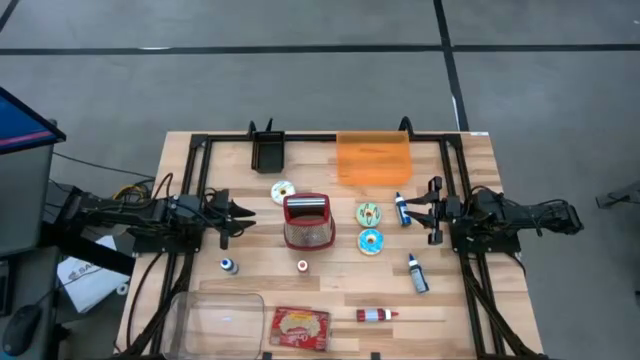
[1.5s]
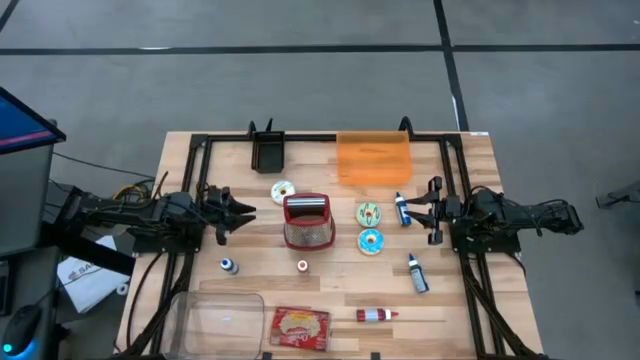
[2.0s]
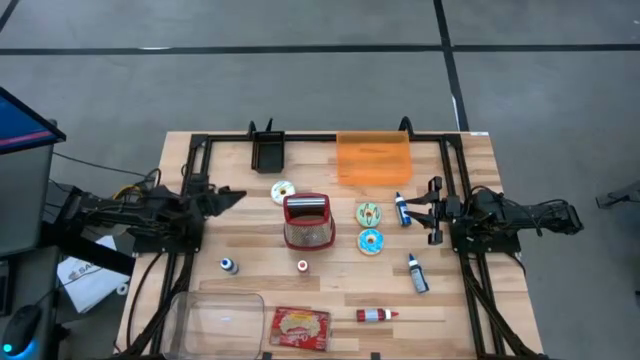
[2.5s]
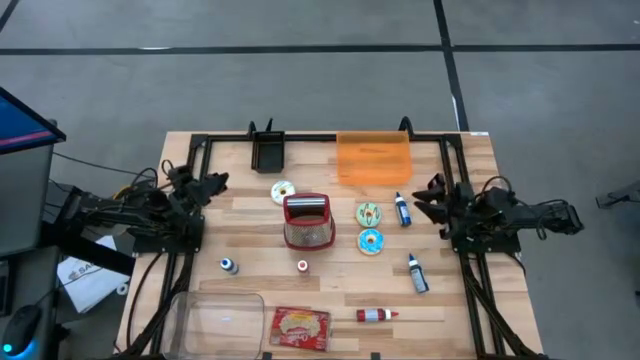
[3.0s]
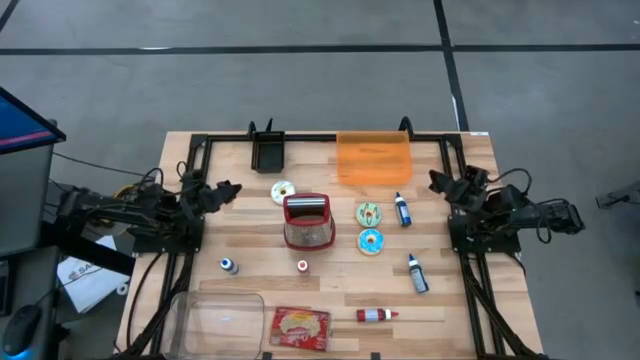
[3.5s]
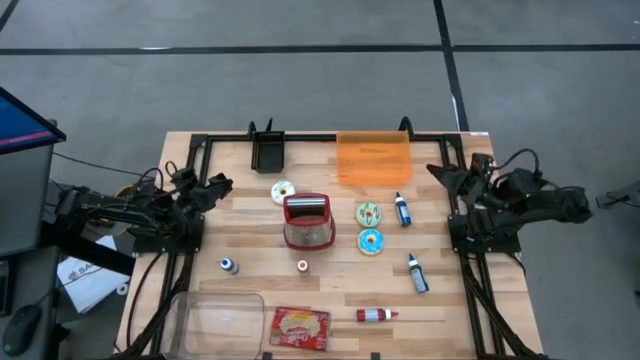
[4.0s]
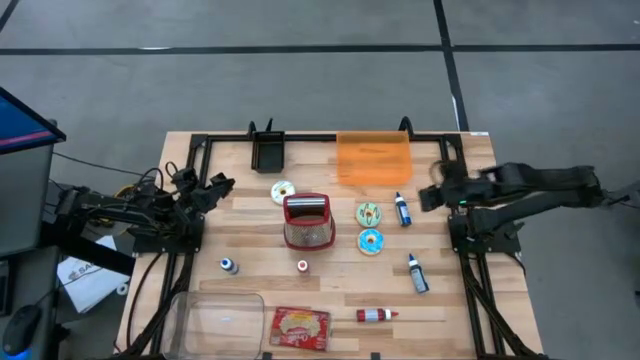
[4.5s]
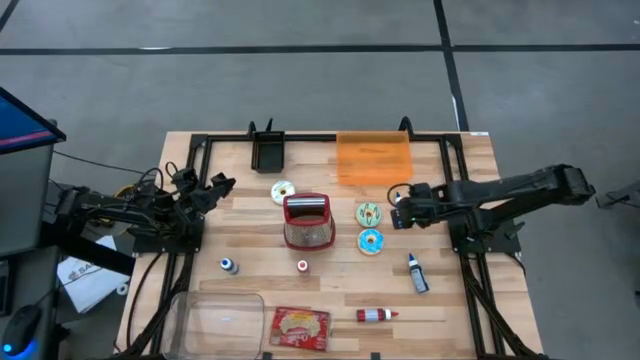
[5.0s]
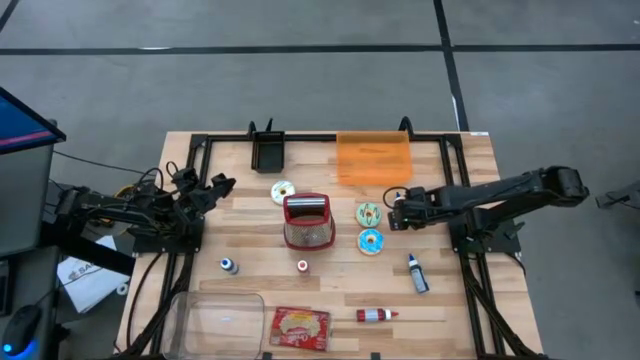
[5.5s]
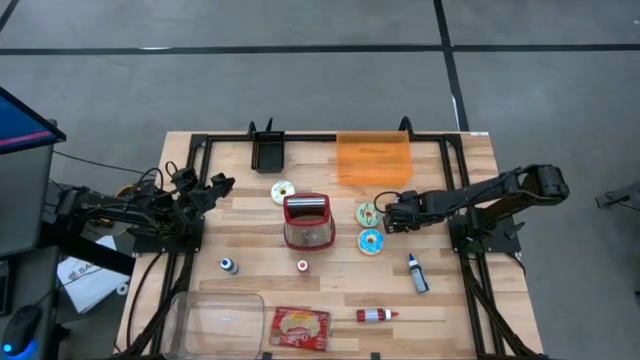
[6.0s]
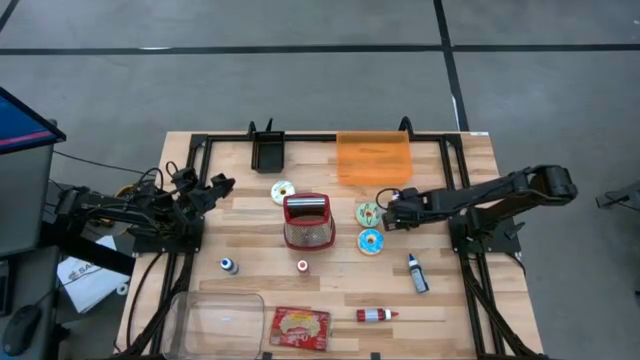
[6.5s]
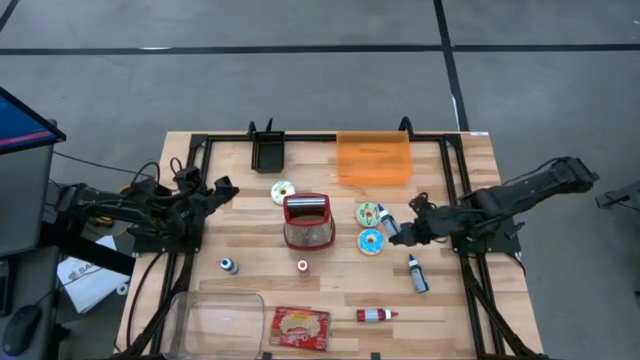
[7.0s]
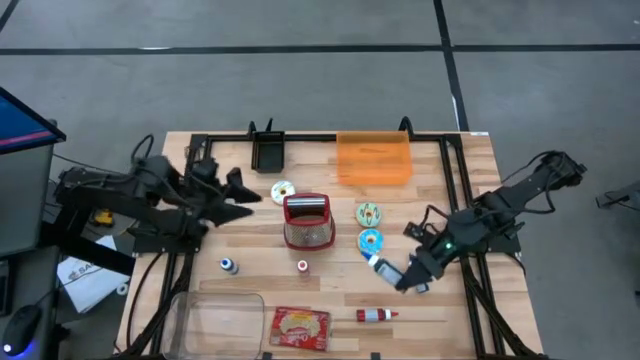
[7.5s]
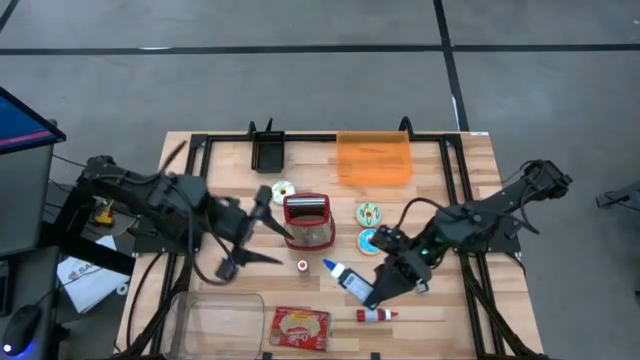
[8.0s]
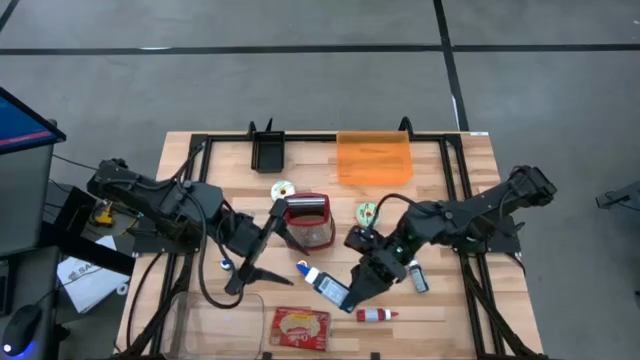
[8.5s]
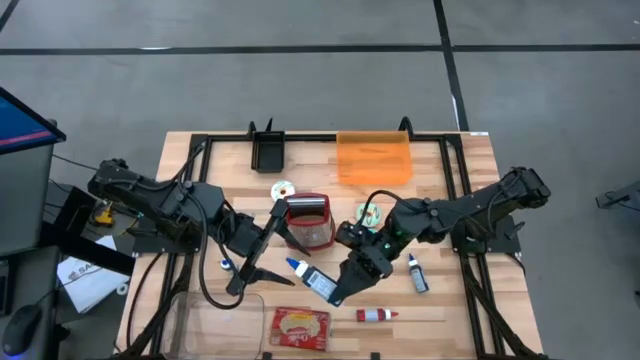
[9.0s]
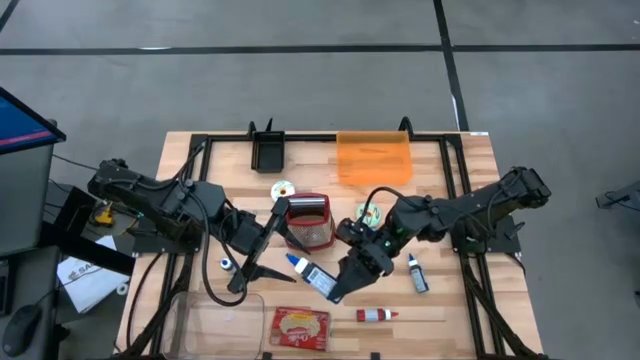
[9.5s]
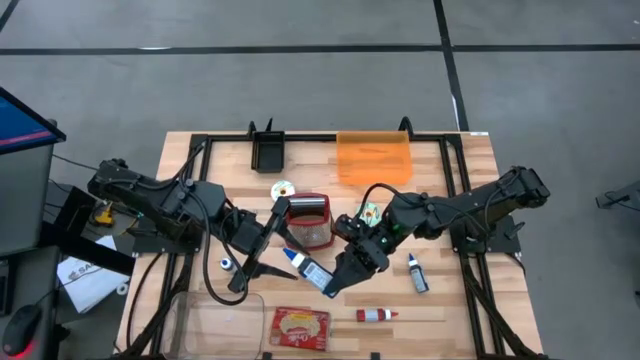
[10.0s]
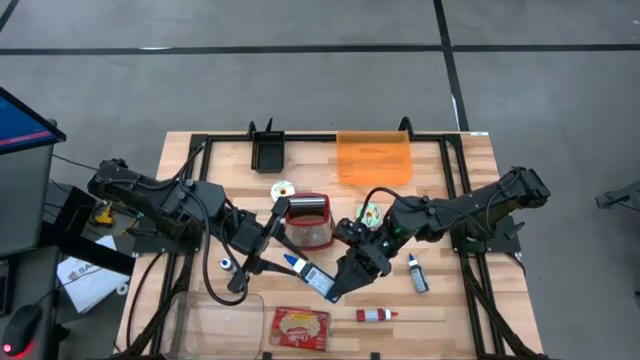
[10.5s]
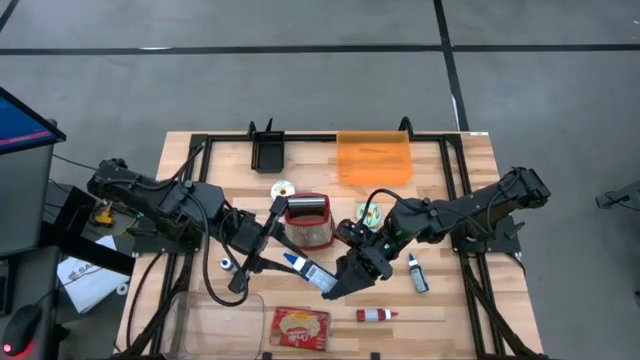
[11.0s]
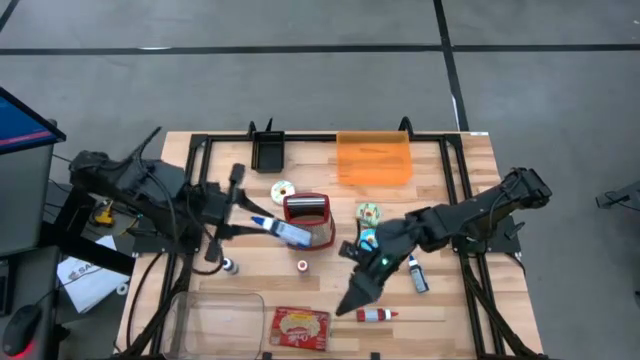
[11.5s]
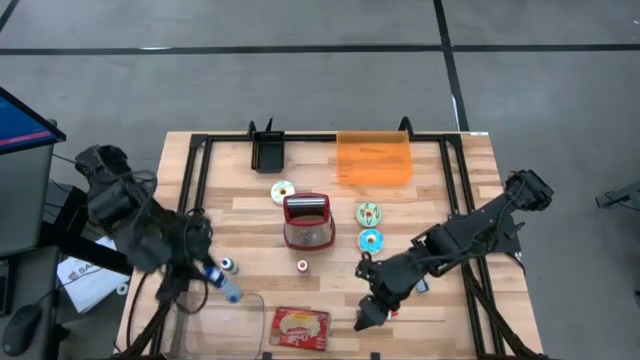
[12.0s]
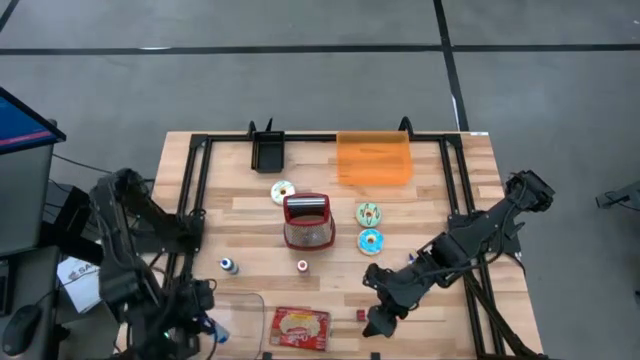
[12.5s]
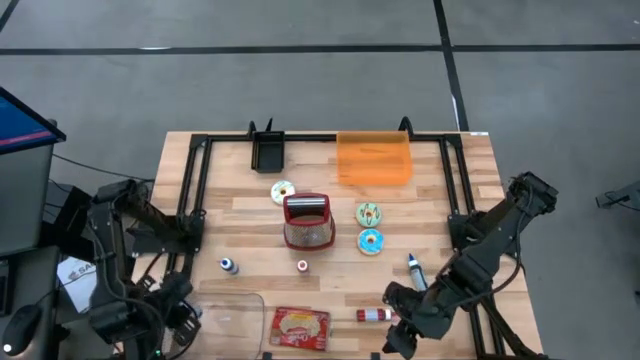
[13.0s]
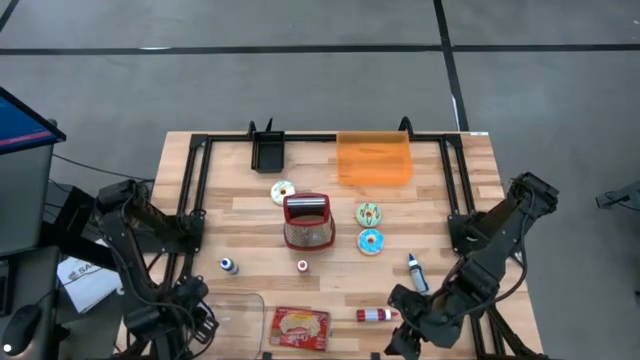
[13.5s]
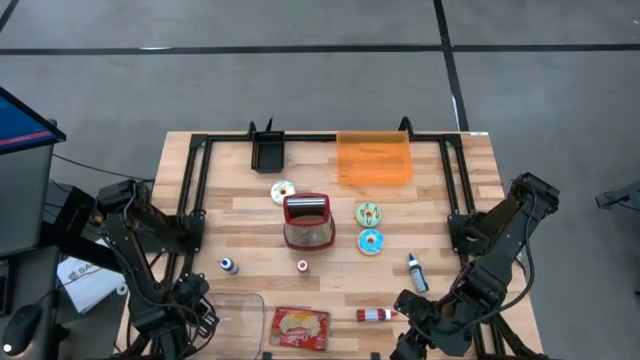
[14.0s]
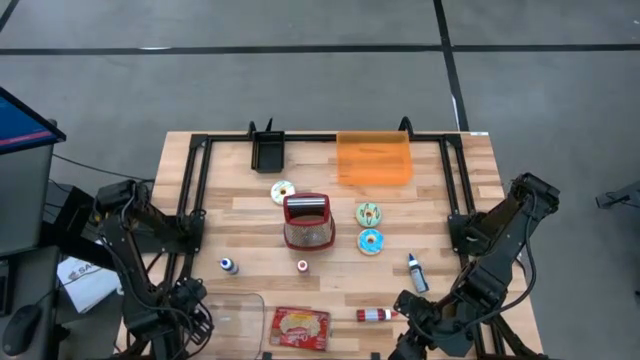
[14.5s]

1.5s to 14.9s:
Put the top blue food coloring bottle into the transparent bin

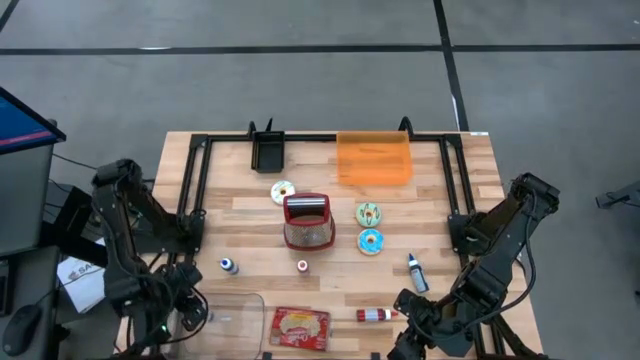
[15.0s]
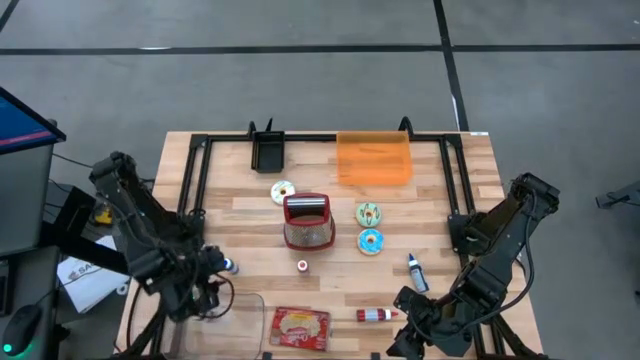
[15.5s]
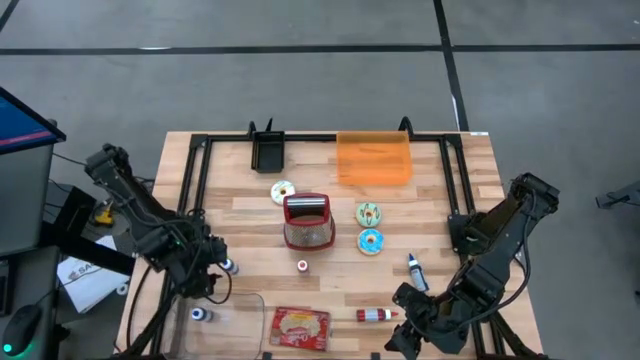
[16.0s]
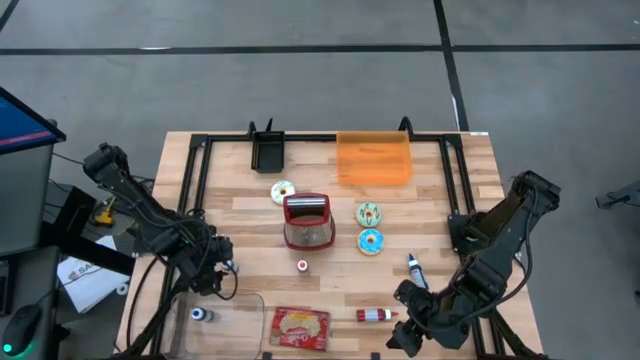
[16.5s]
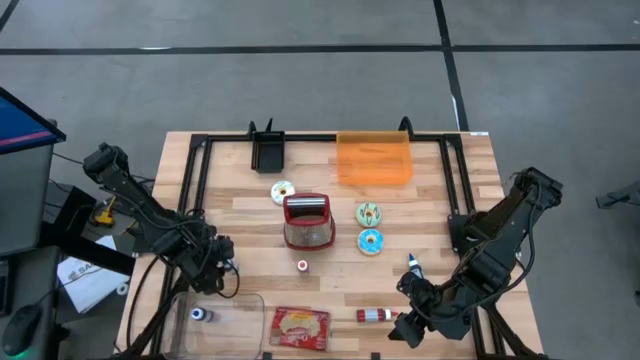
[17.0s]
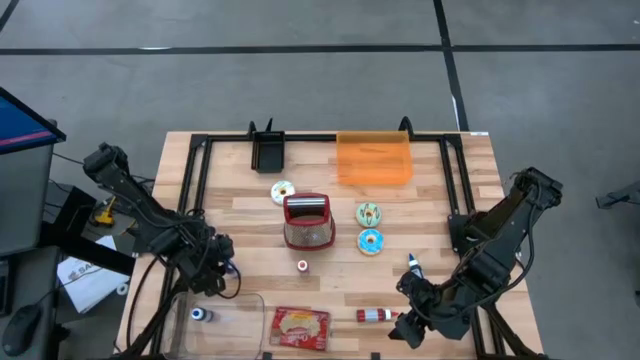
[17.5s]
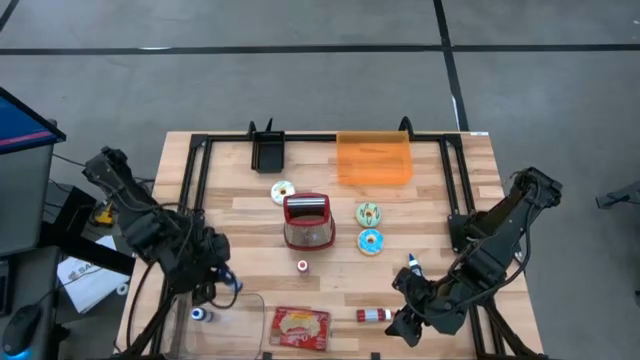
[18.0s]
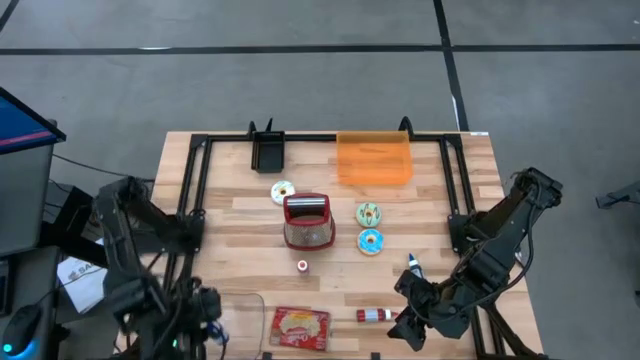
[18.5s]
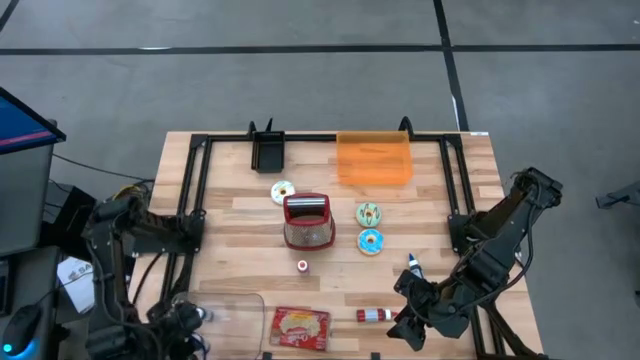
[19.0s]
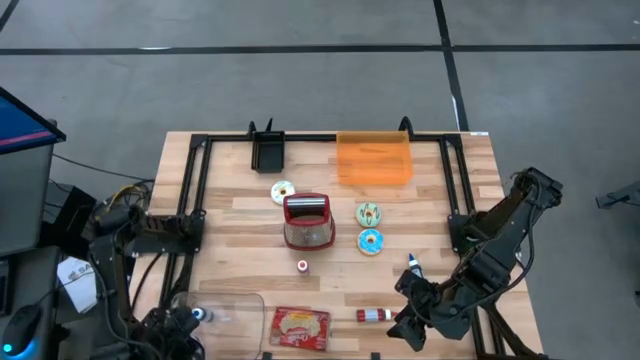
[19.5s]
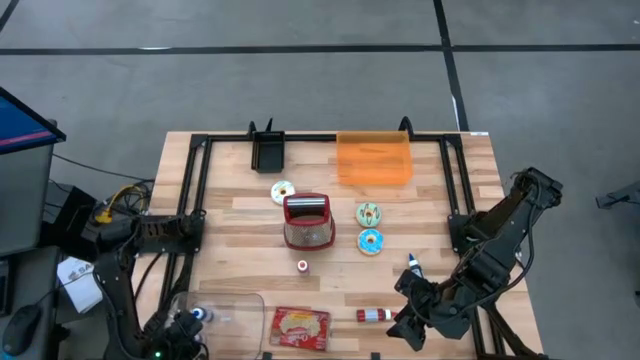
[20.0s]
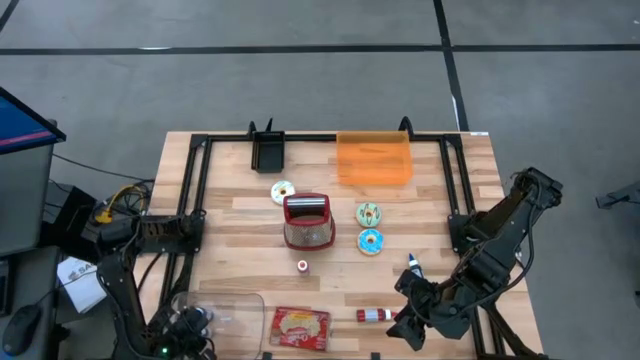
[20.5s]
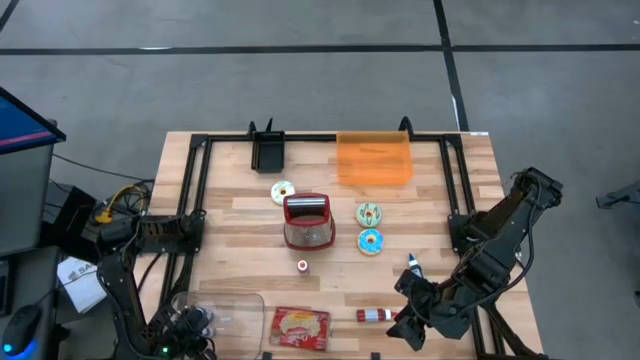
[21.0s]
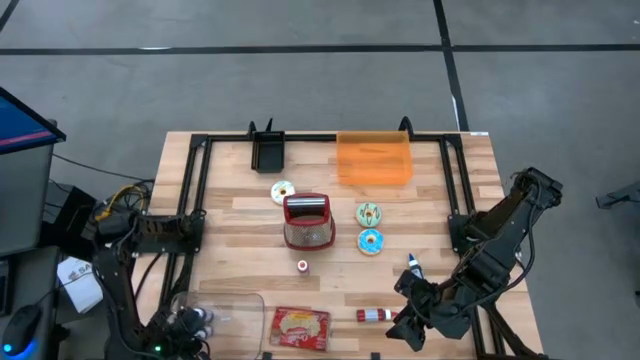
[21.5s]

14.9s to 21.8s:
Put the left blue food coloring bottle into the transparent bin
